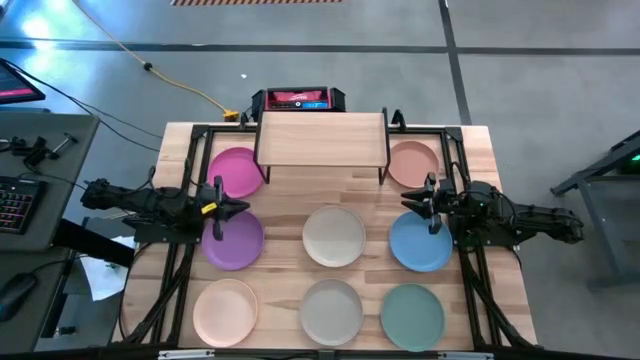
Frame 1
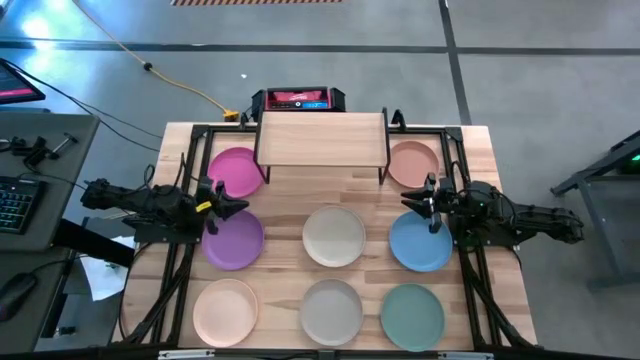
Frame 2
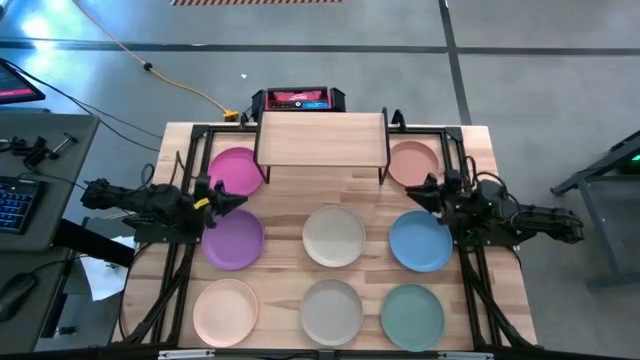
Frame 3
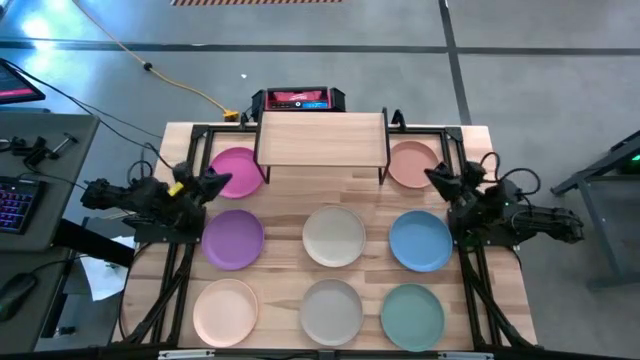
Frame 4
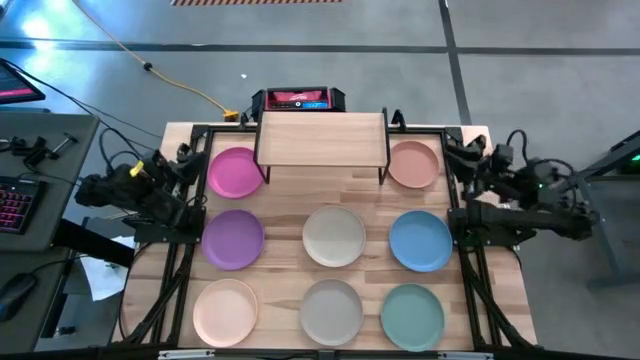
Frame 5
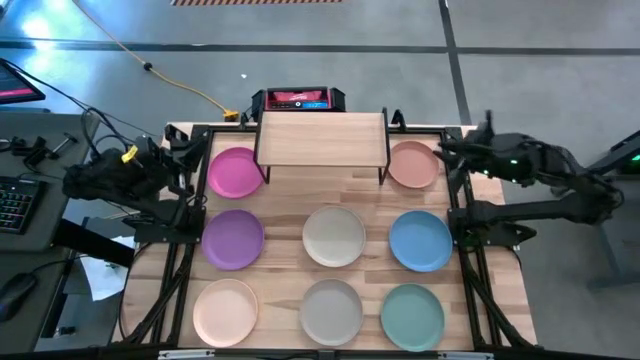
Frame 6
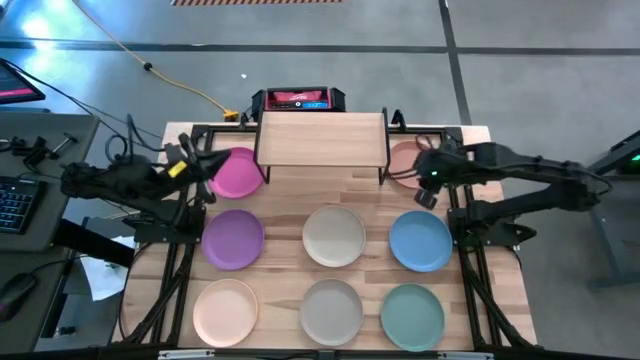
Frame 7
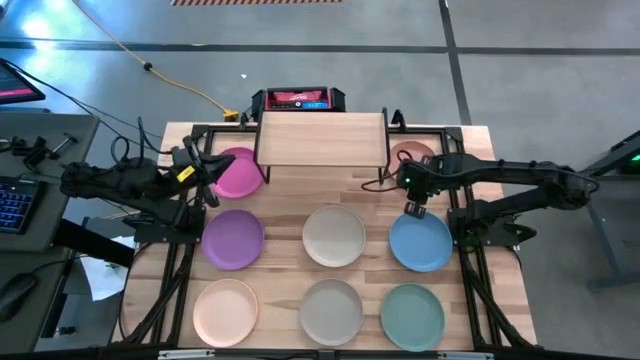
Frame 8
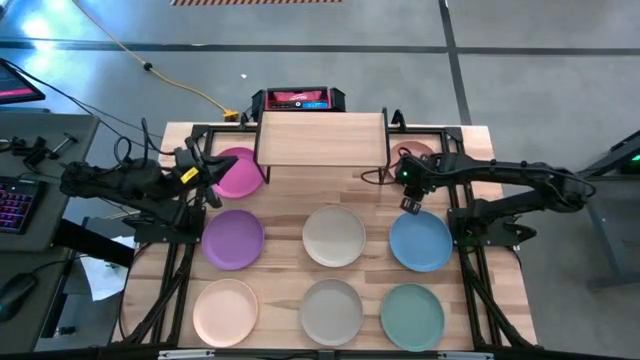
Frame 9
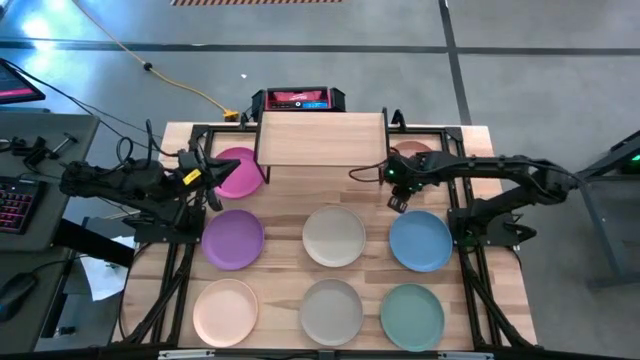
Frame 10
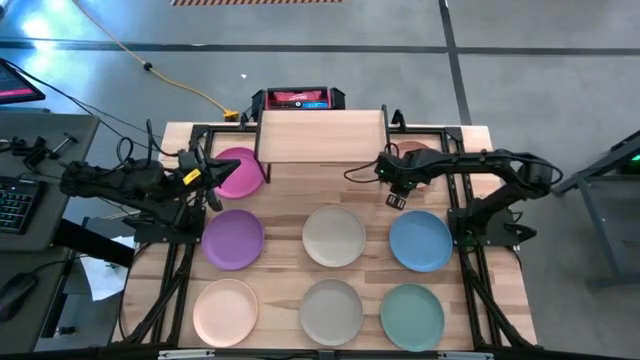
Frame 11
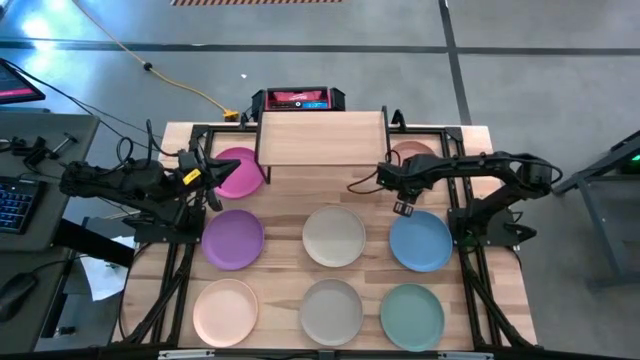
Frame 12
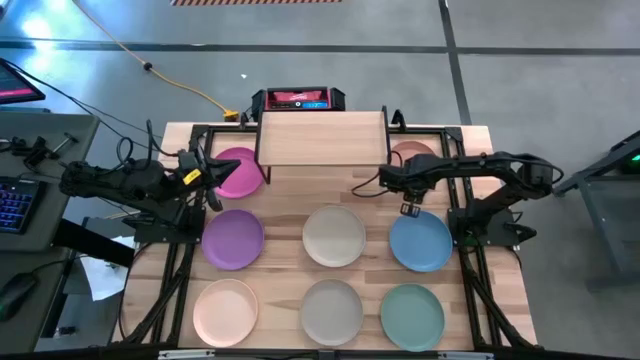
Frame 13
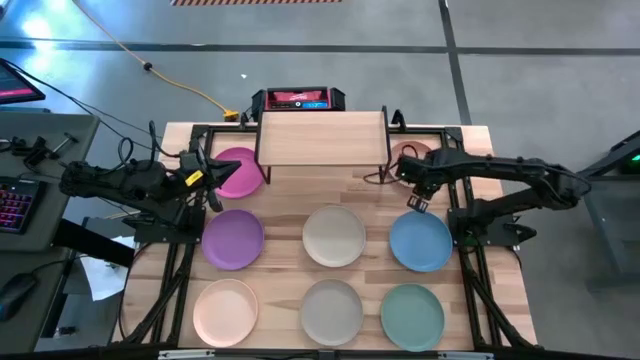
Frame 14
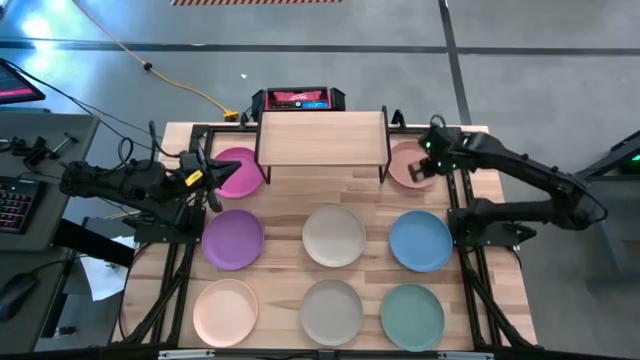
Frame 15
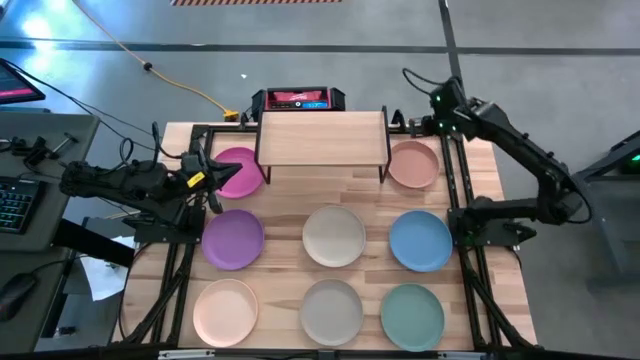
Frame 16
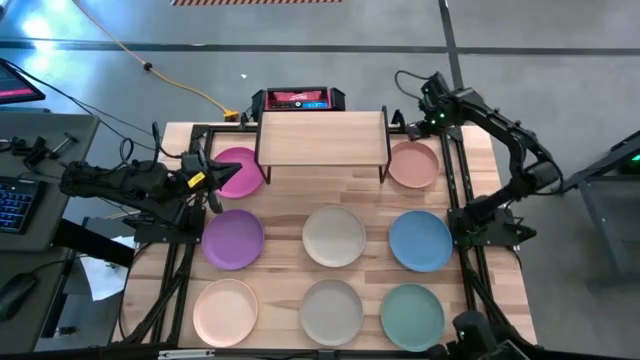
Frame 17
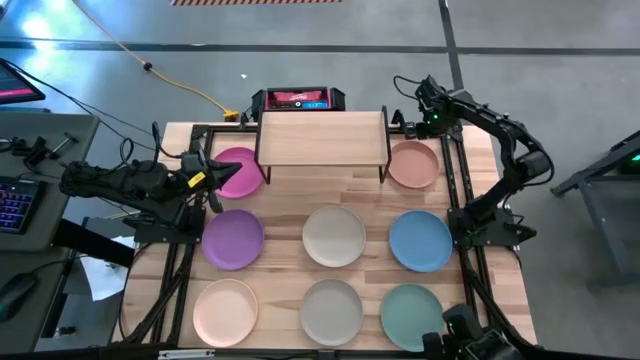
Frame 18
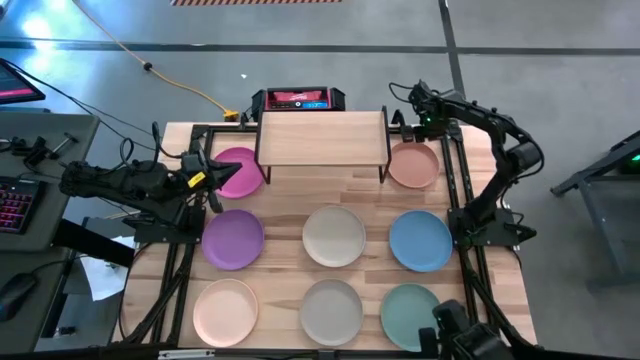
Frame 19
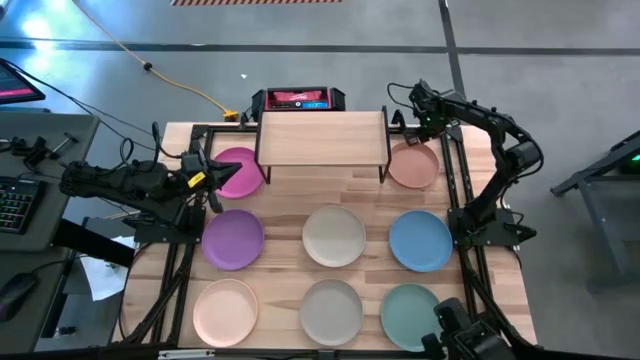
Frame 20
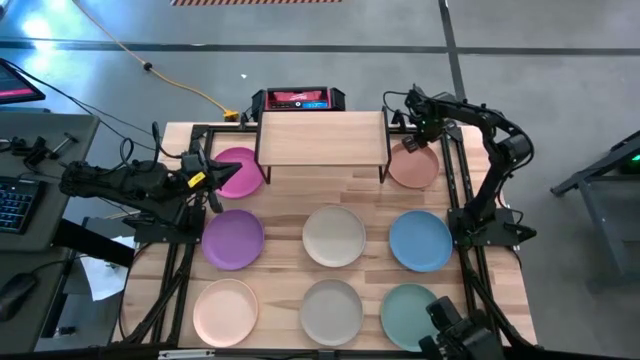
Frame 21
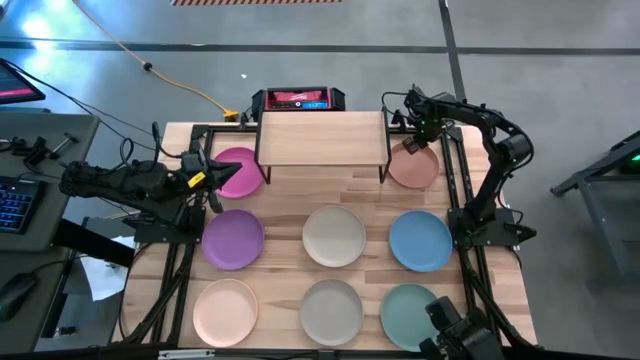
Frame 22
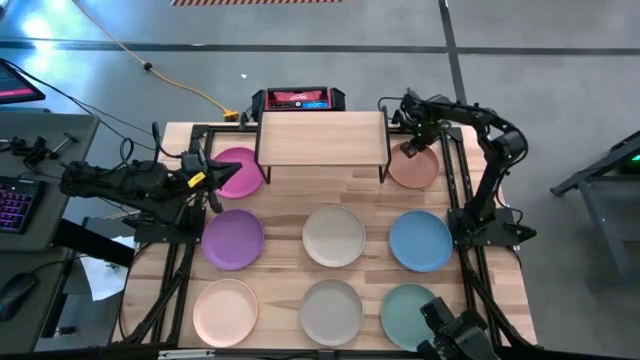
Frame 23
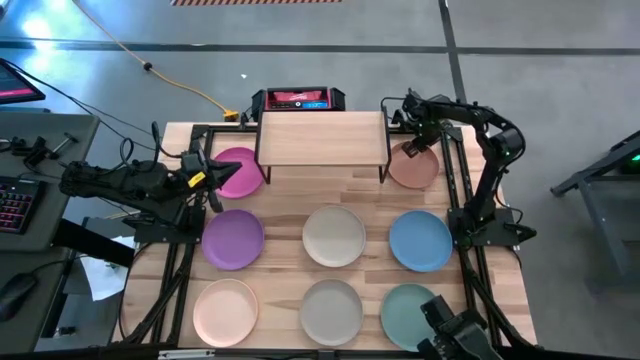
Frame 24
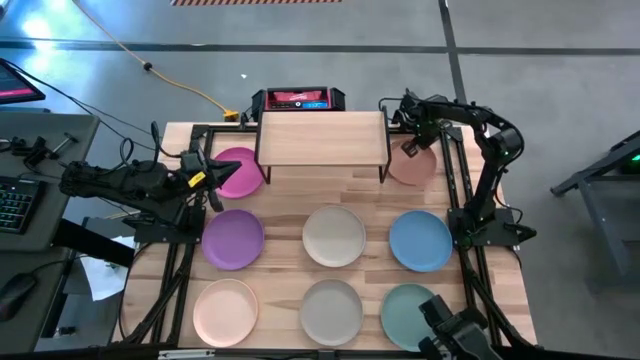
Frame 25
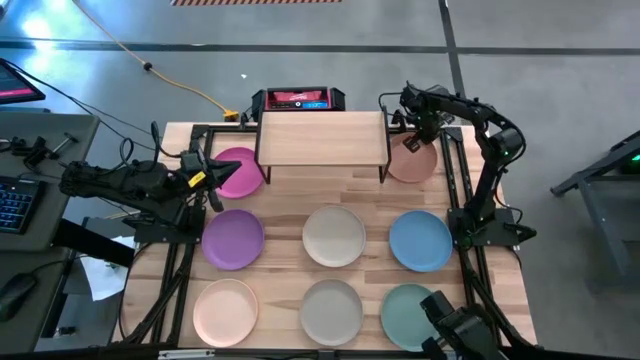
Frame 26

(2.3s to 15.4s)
Task: Place and stack plates onto a shelf
Put the brown plate on the shelf

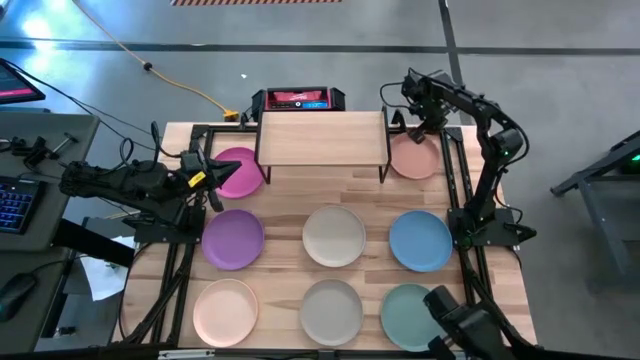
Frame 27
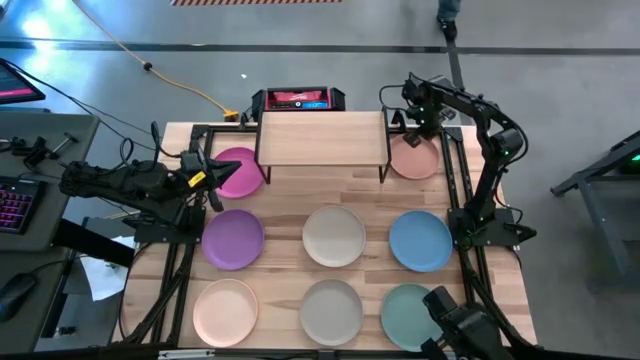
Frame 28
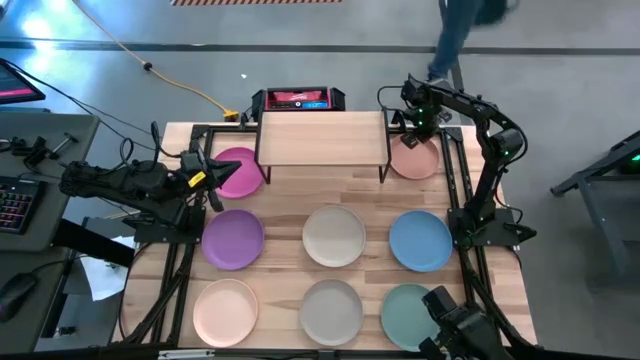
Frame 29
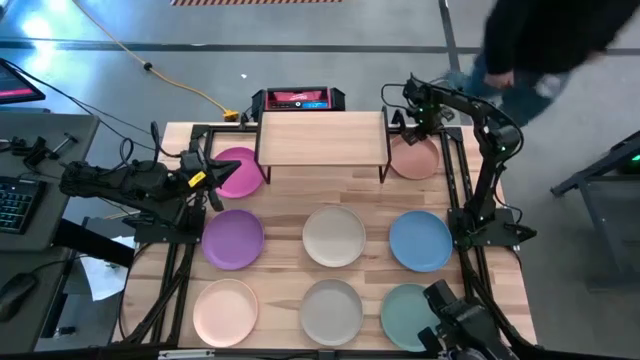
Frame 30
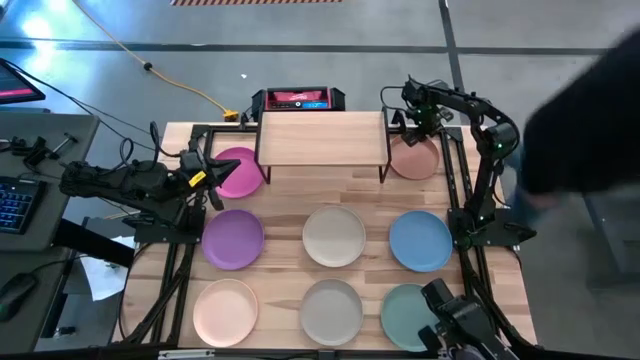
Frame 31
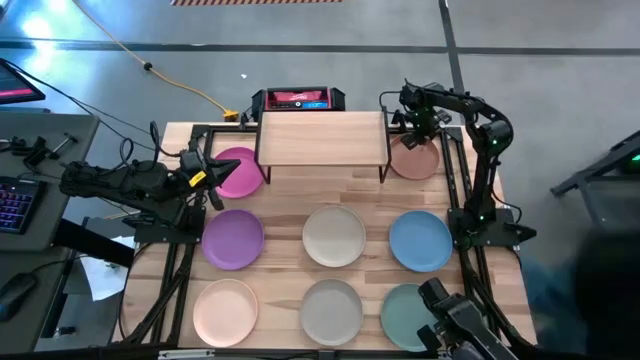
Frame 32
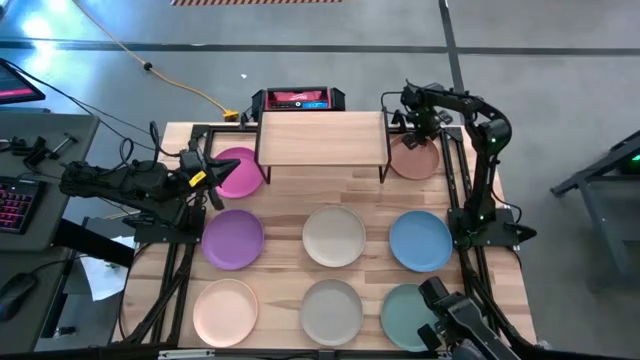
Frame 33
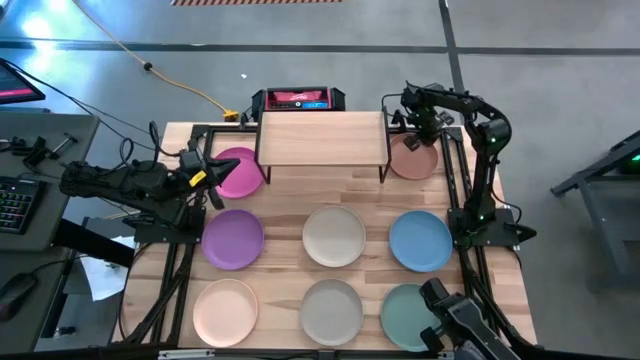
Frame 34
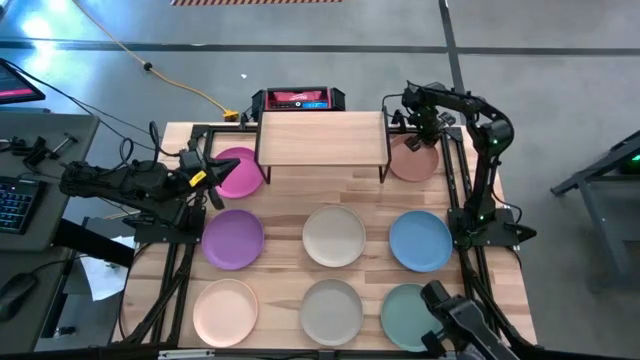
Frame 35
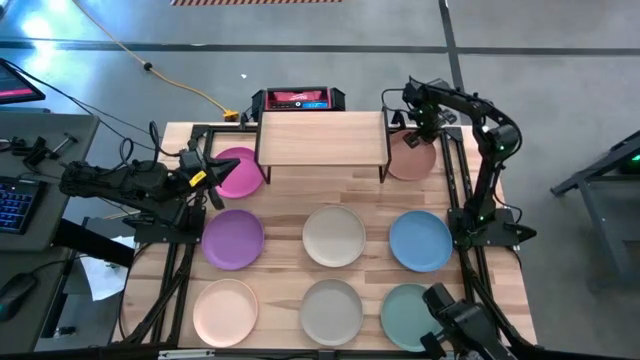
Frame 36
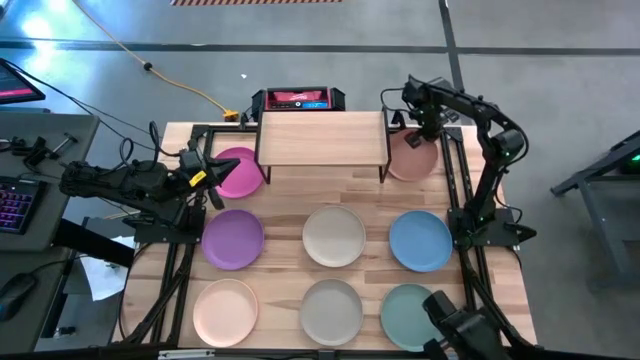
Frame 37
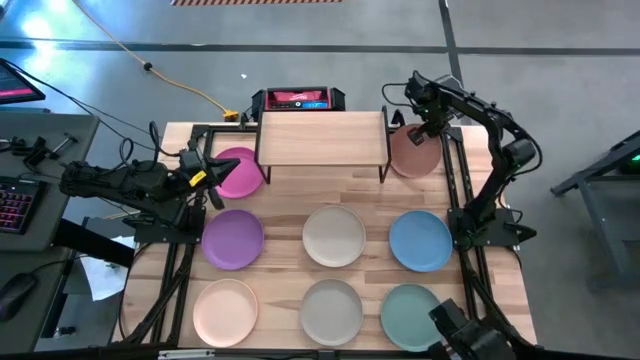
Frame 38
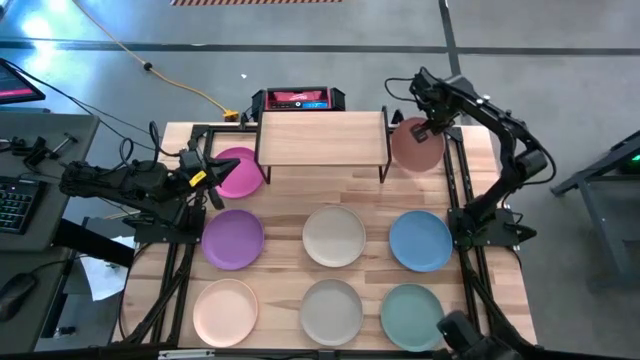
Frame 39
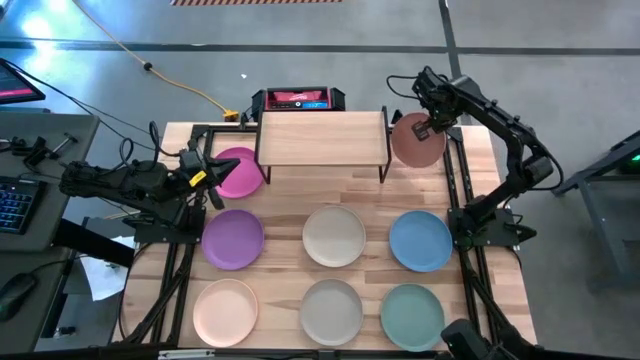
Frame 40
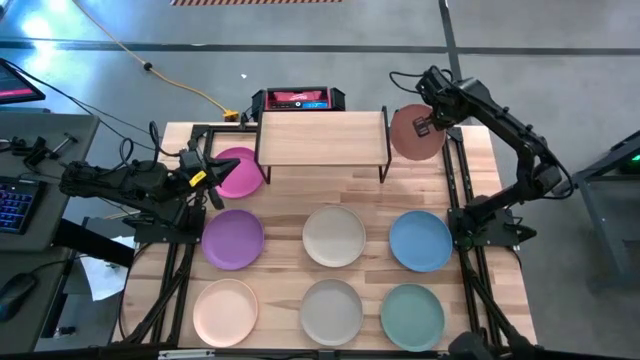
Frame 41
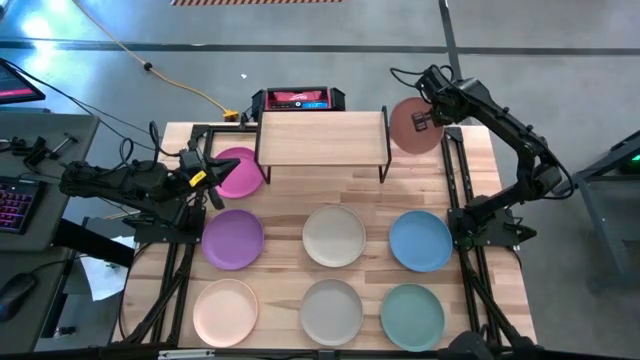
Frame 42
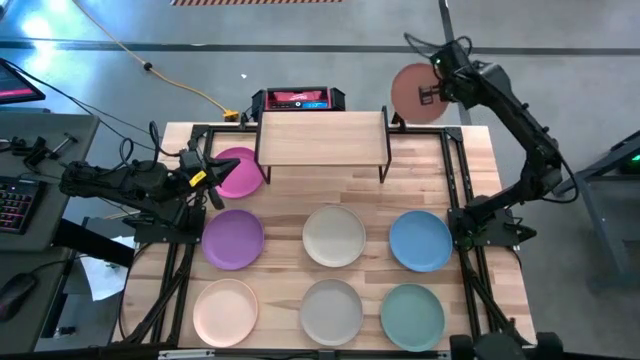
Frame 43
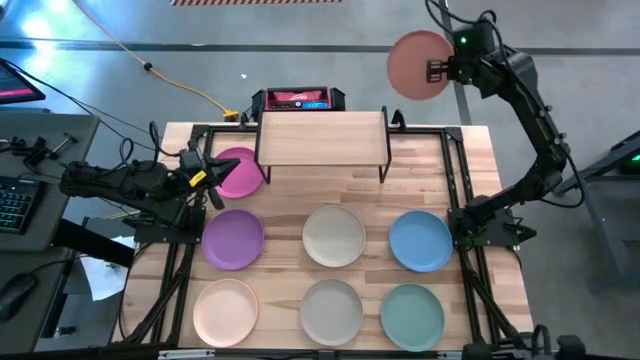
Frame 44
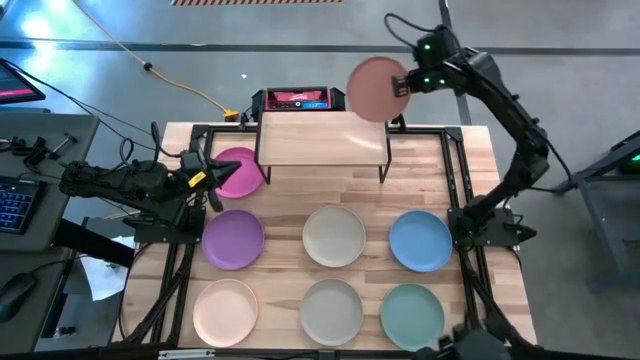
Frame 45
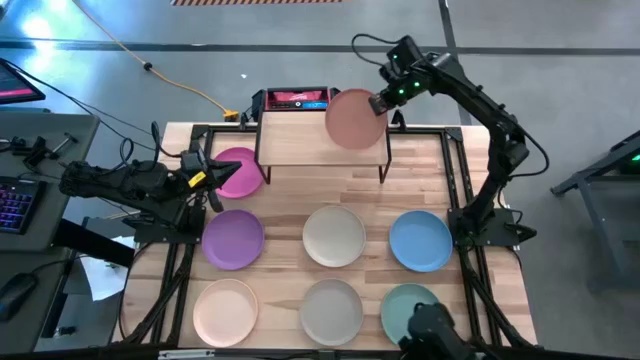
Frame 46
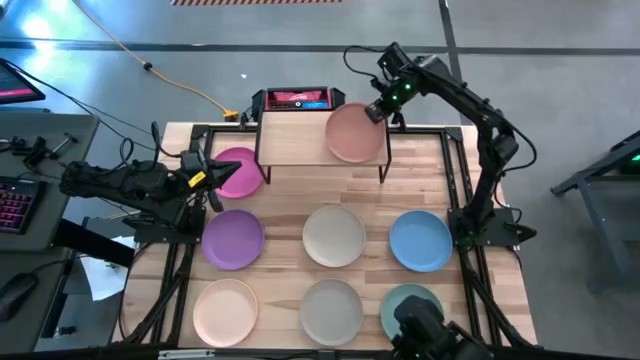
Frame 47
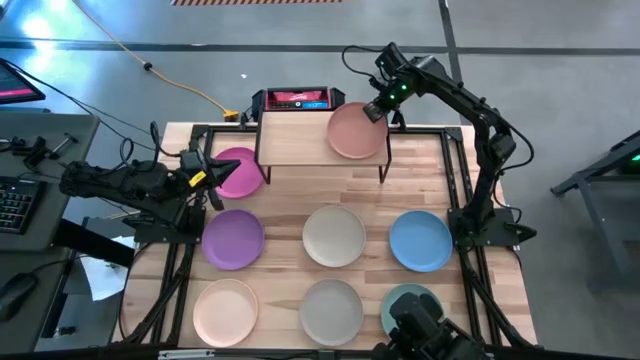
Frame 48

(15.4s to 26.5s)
Put the brown plate on the shelf
